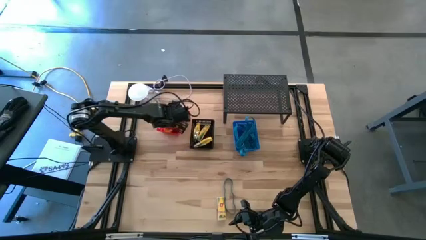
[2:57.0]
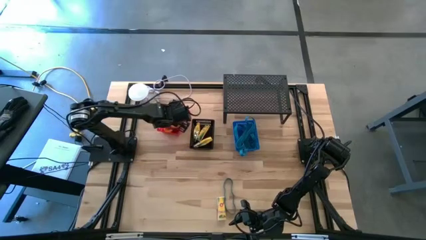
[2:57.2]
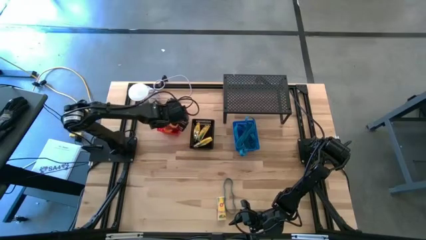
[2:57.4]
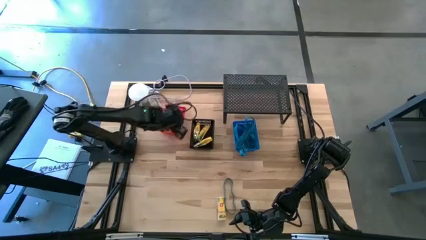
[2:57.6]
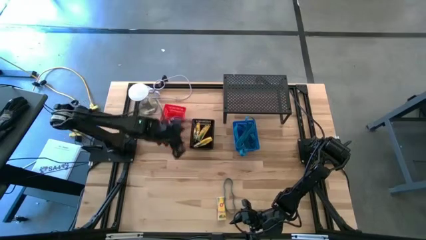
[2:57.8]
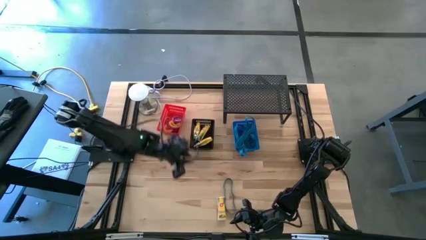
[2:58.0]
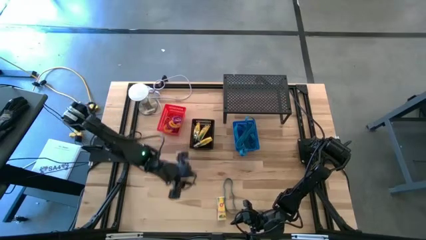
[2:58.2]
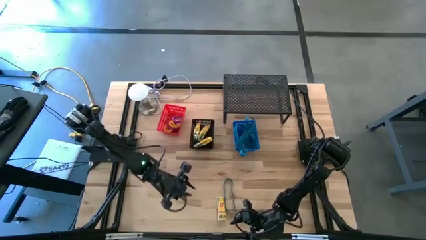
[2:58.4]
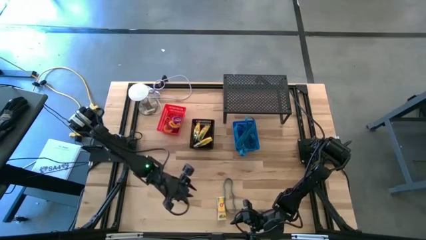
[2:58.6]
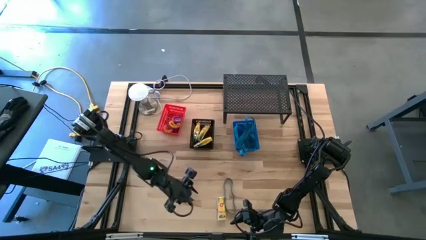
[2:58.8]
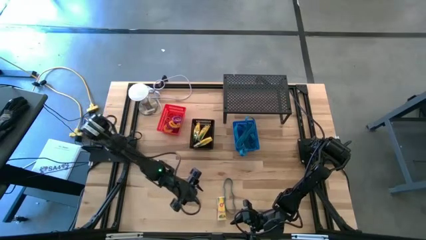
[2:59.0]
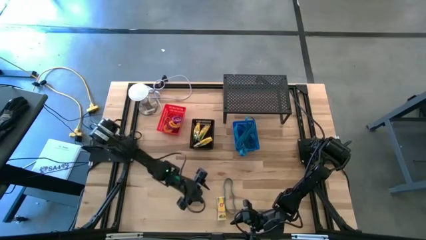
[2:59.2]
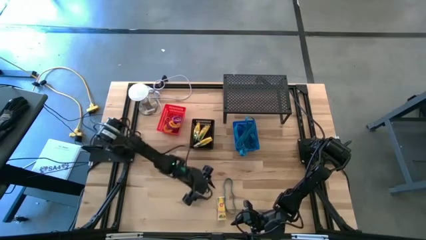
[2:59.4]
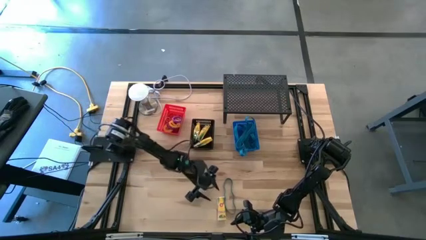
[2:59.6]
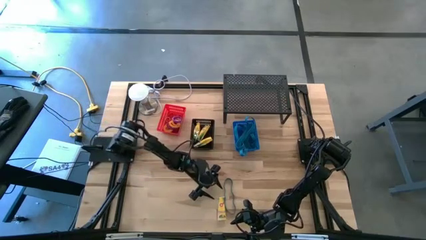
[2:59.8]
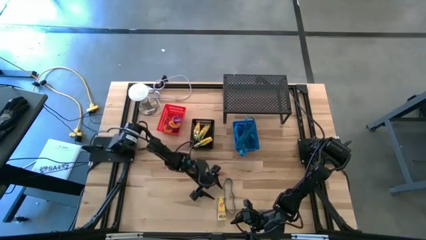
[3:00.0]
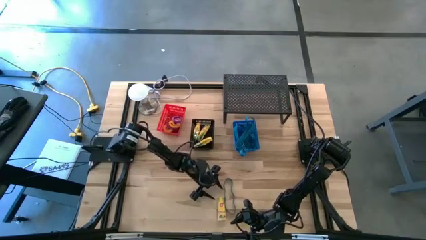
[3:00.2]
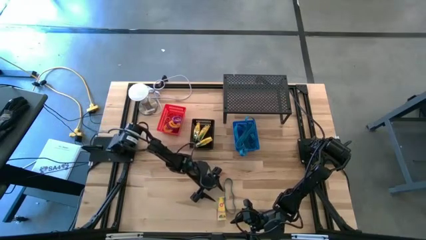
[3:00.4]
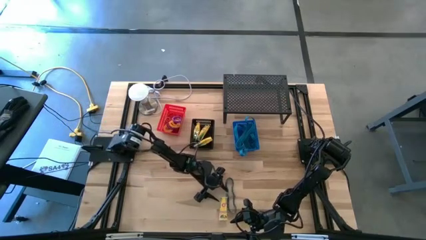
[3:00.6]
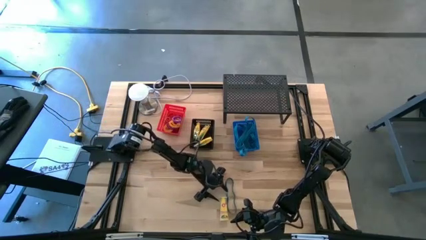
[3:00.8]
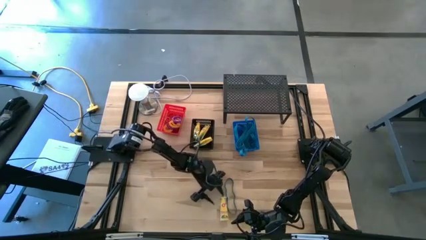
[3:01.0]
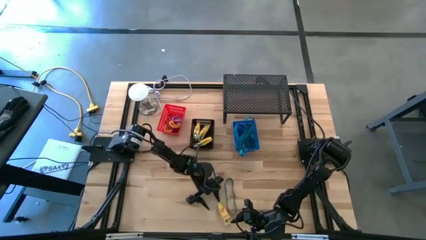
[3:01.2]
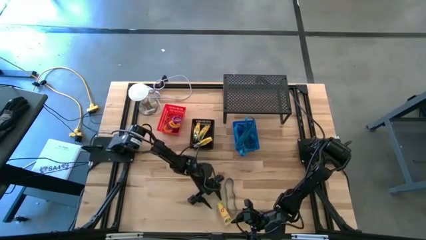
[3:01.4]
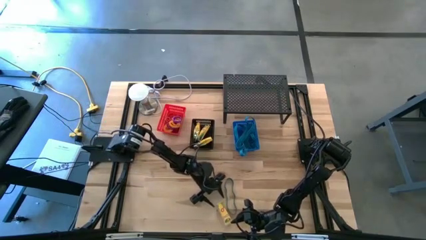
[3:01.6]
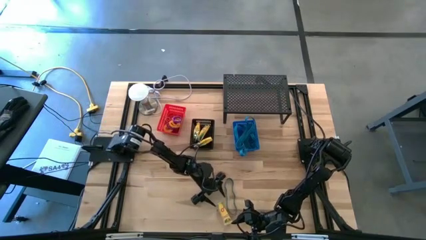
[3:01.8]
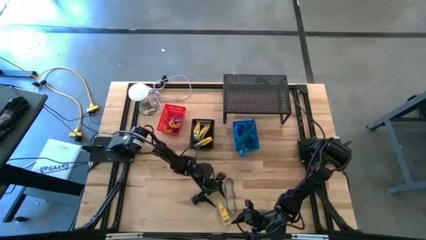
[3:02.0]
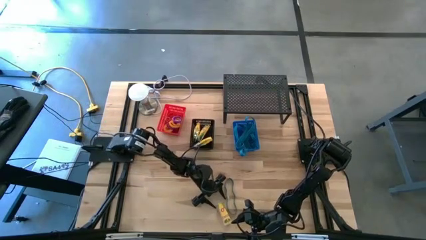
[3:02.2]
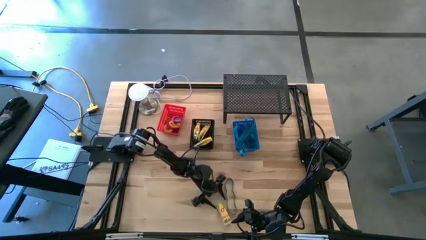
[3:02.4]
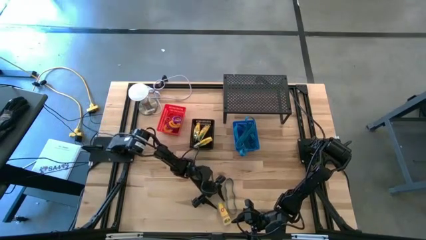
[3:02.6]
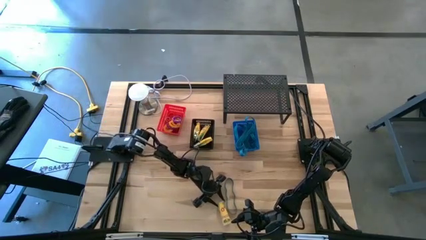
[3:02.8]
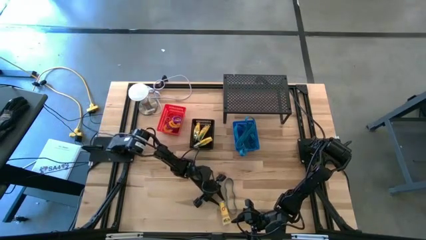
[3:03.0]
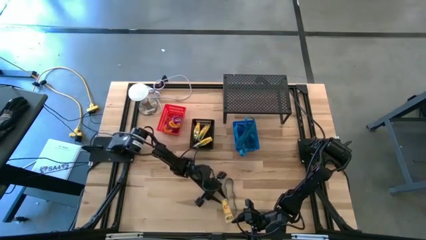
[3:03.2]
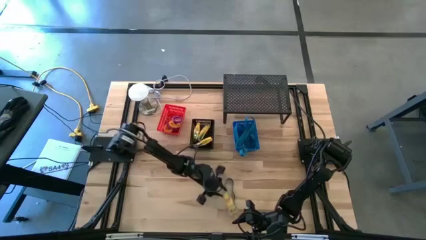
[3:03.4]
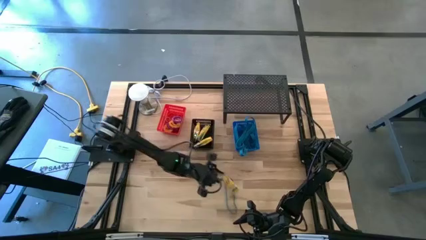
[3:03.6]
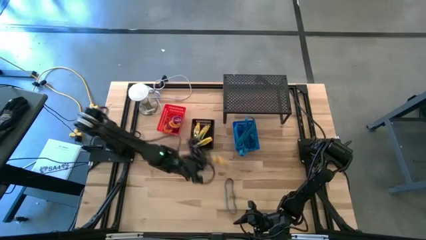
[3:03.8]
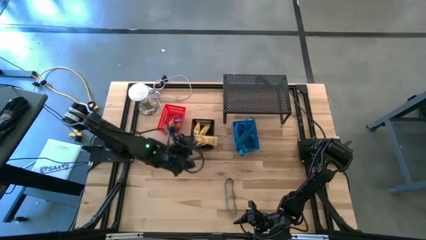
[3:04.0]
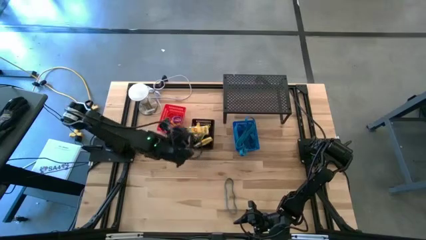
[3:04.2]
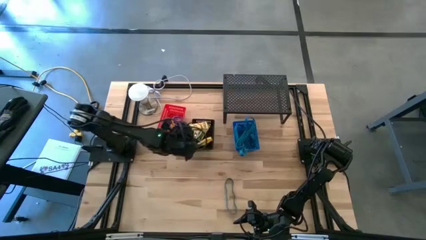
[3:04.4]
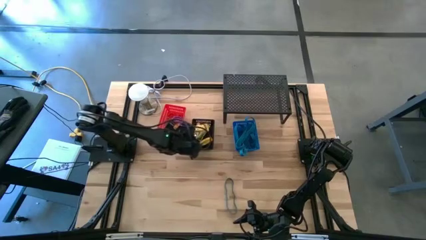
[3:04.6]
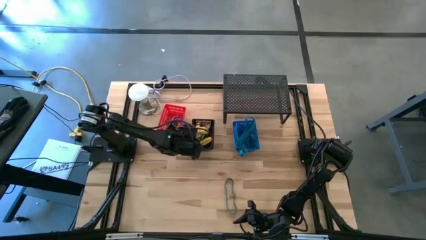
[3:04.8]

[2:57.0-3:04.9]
Task: Pick & Place Office Desk Supplies
Put the crayon box into the black bin

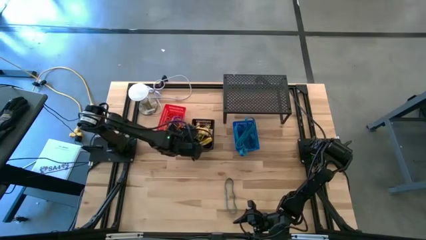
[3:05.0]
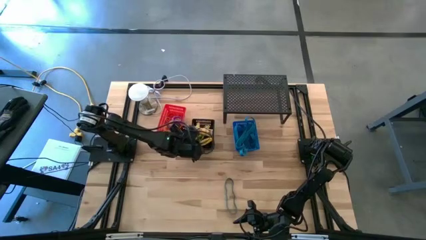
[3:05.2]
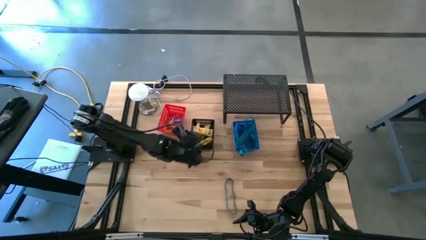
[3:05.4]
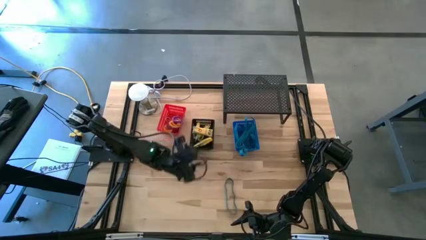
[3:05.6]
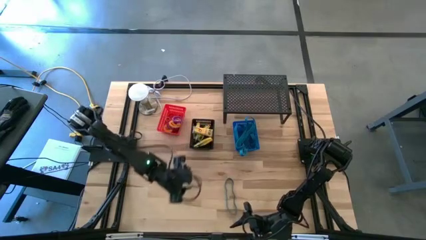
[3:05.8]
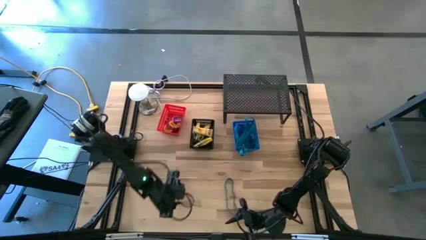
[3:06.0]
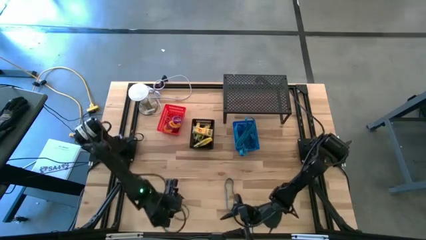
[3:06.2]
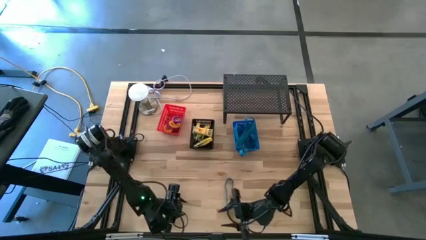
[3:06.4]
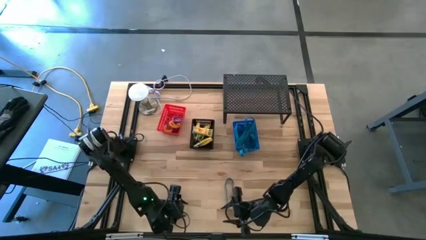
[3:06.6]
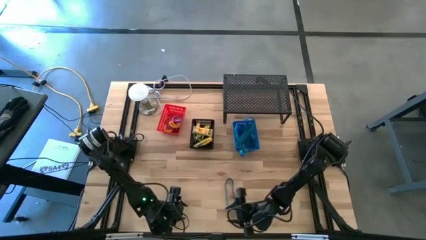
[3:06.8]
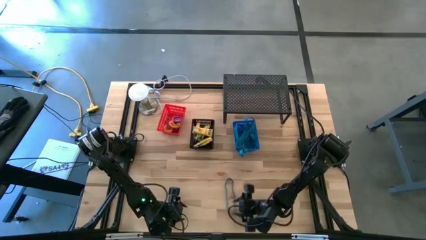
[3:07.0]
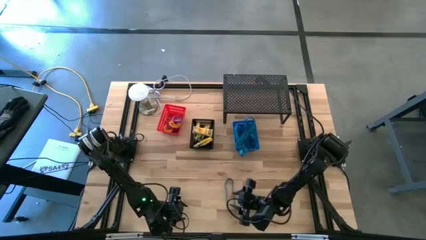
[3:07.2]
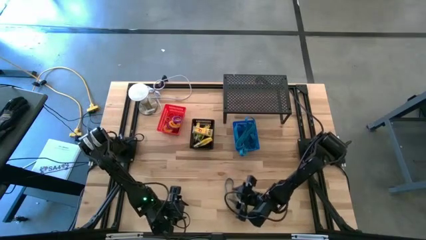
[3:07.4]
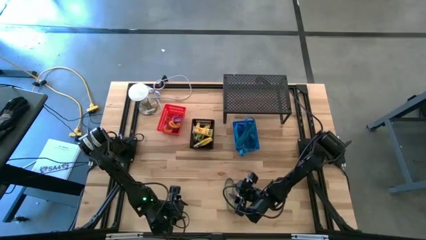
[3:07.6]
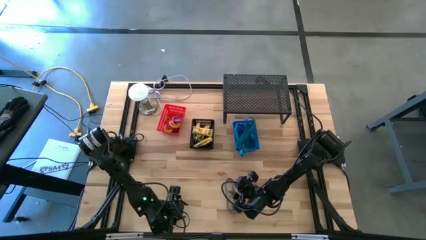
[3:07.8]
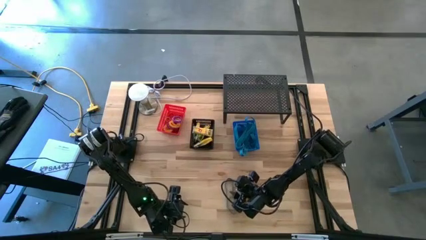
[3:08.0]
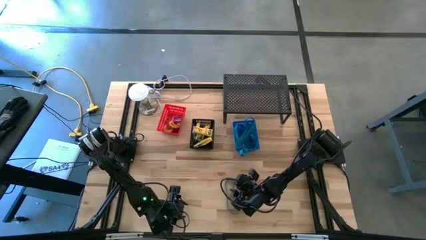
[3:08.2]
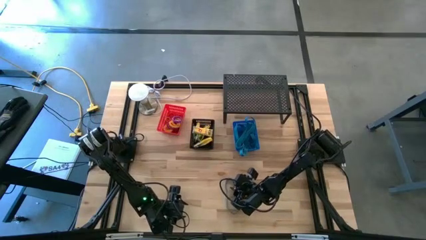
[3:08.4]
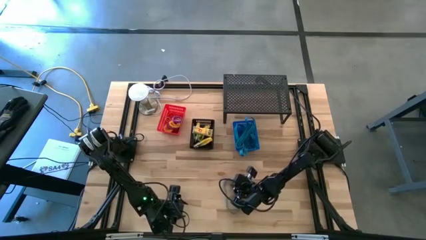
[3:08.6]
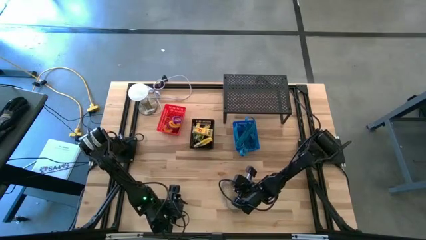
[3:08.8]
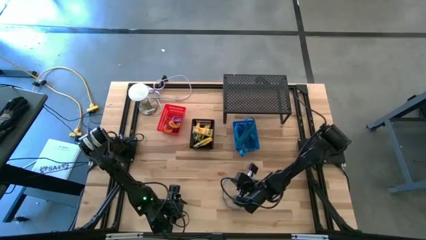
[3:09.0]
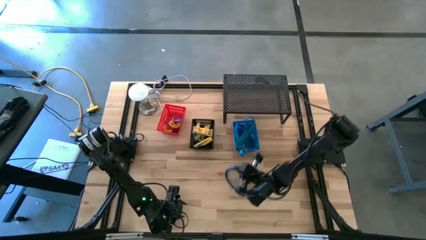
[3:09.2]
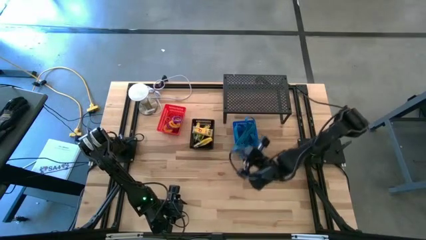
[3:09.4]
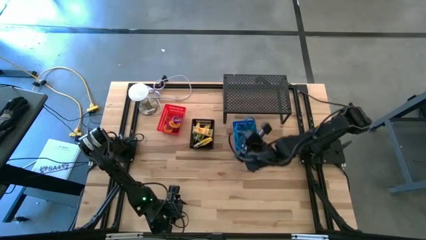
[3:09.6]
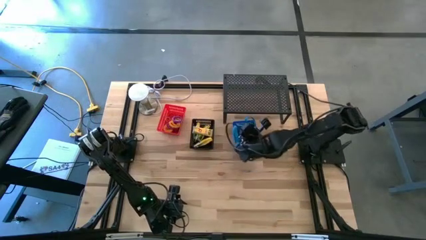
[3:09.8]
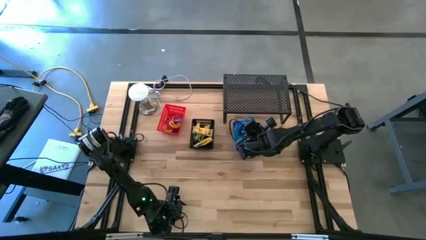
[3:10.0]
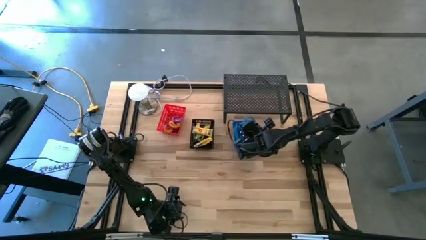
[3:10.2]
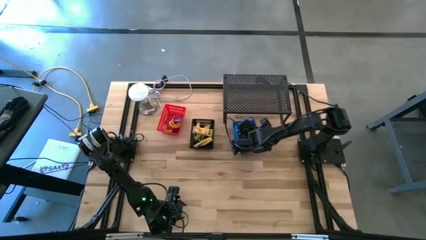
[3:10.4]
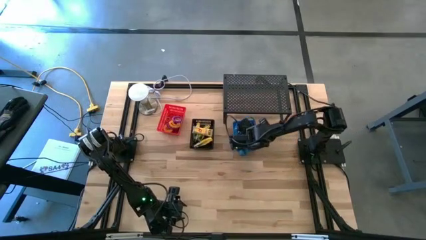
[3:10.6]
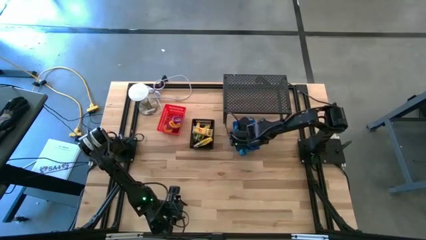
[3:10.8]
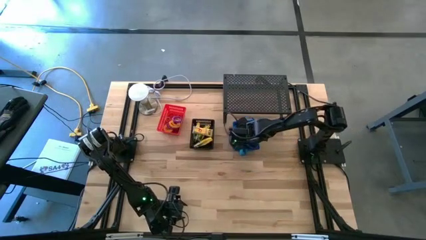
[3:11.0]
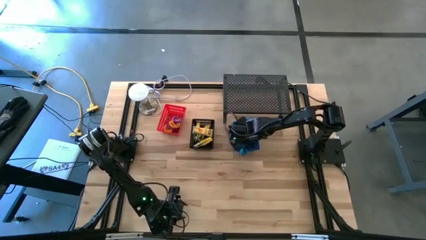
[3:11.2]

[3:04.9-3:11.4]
Put the blue rubber band into the blue bin
